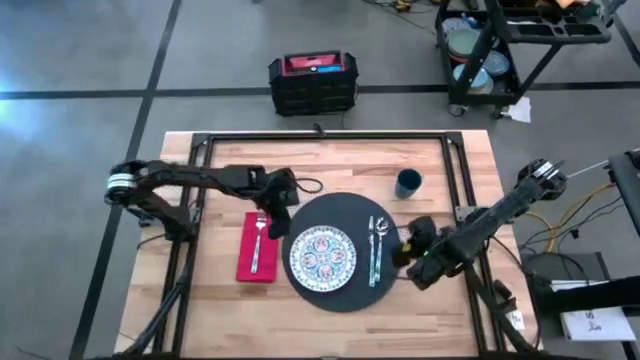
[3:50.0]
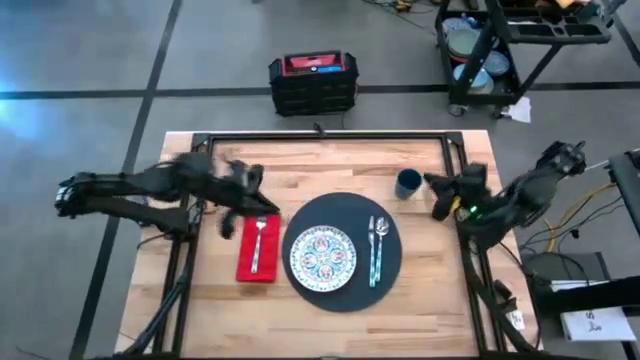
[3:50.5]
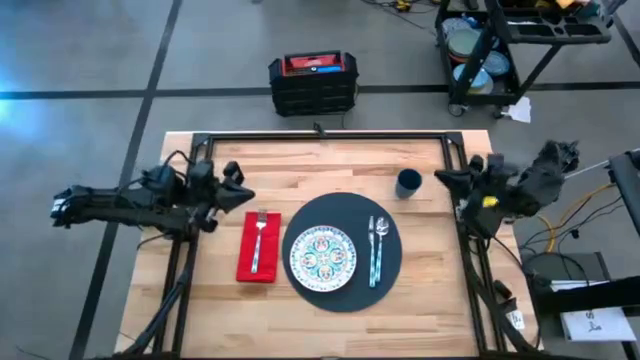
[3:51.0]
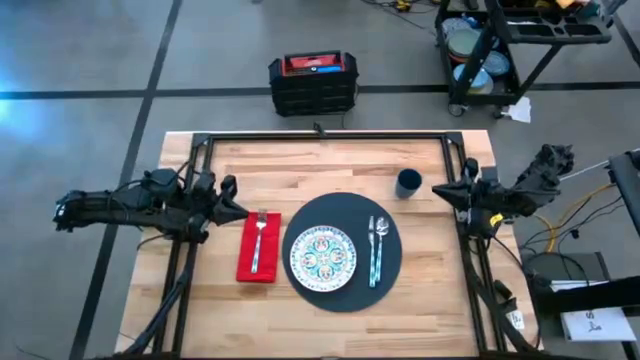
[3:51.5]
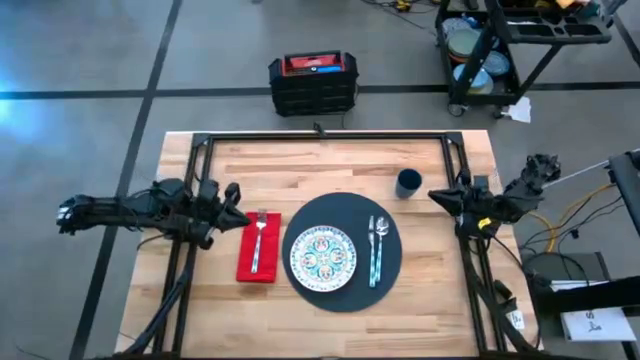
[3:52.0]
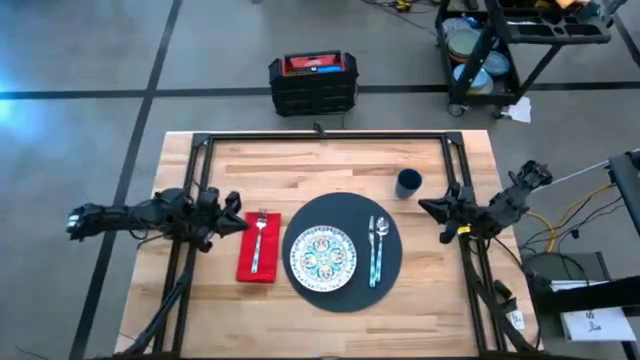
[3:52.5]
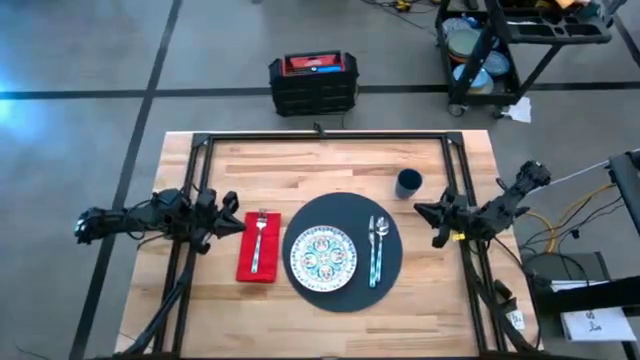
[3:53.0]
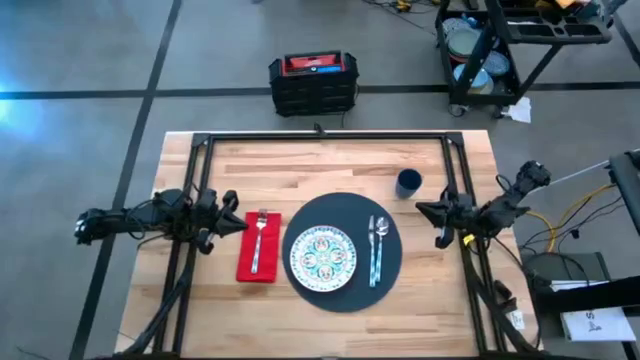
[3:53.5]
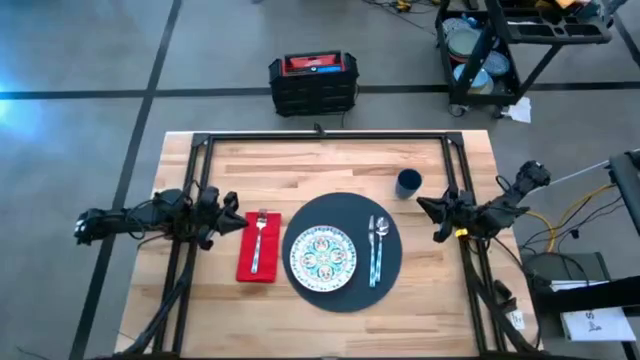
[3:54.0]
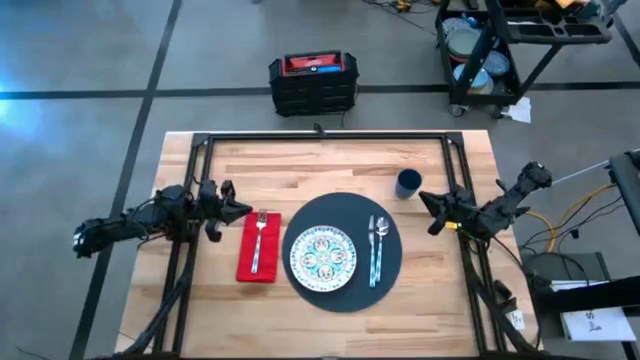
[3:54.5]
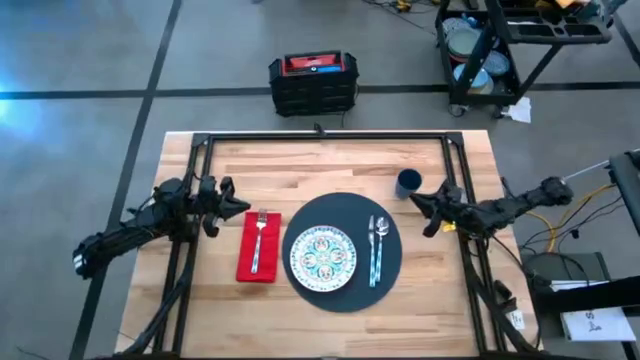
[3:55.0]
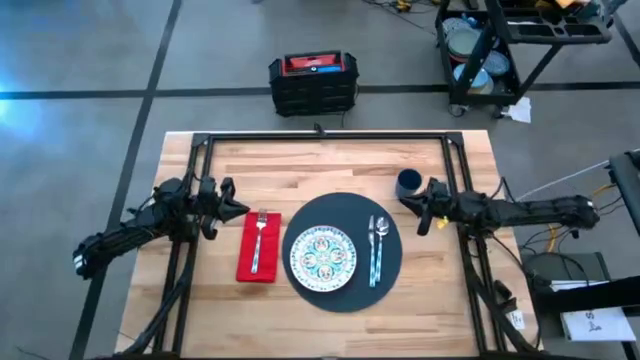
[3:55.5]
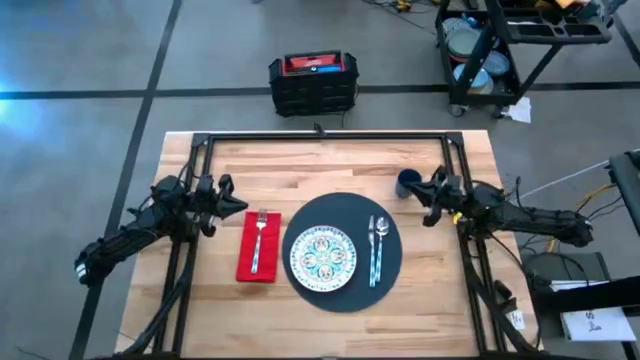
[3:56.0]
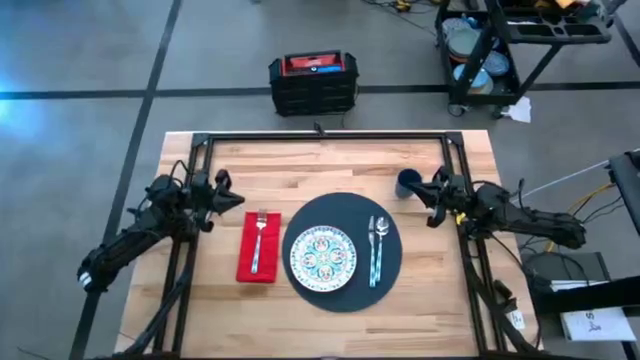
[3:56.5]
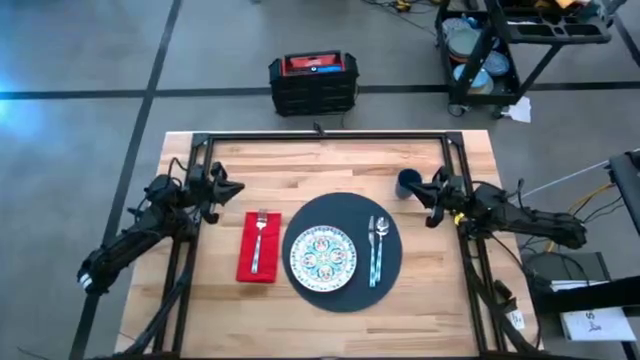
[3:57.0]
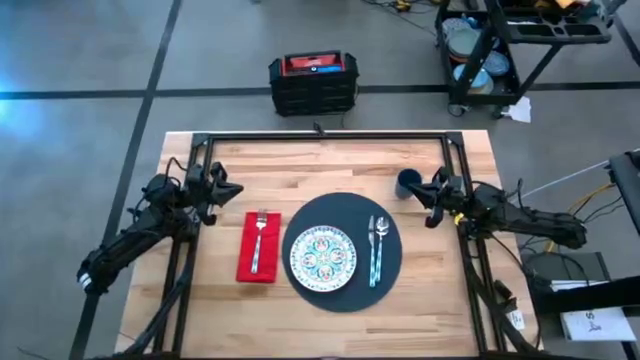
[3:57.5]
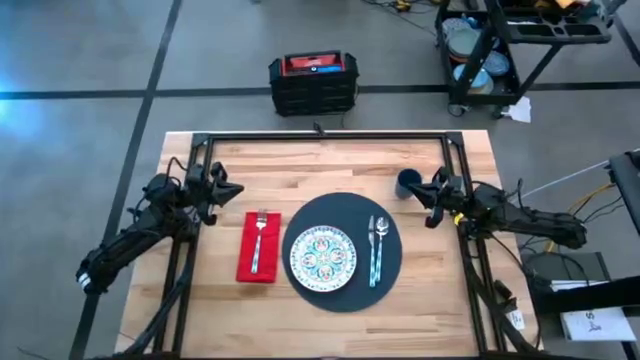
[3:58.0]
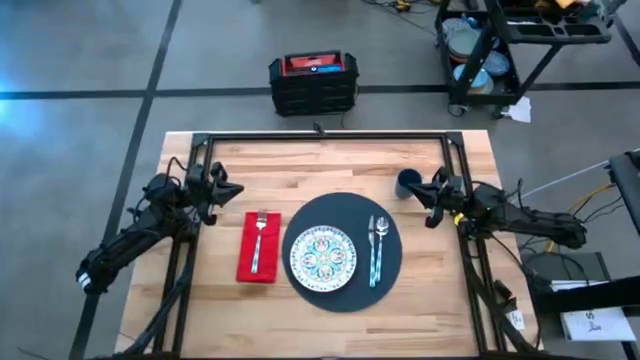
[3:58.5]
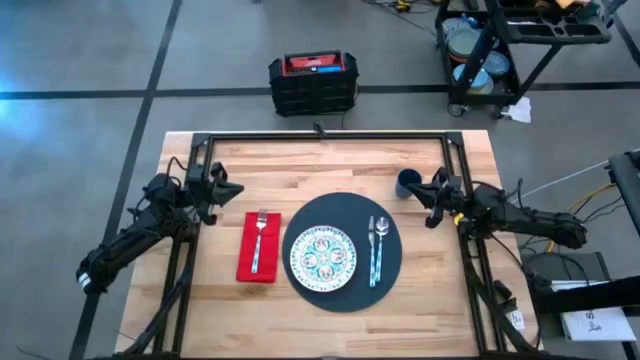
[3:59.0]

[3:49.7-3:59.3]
Task: Set table place
Return to Home Position

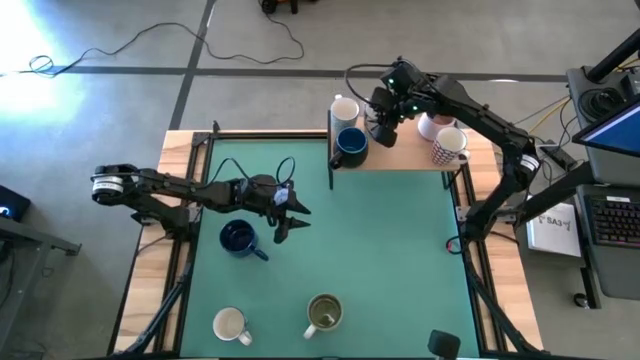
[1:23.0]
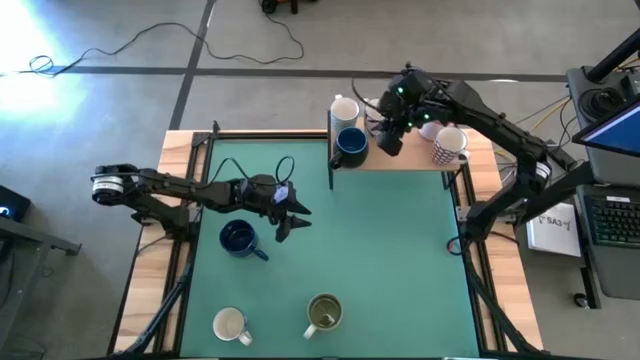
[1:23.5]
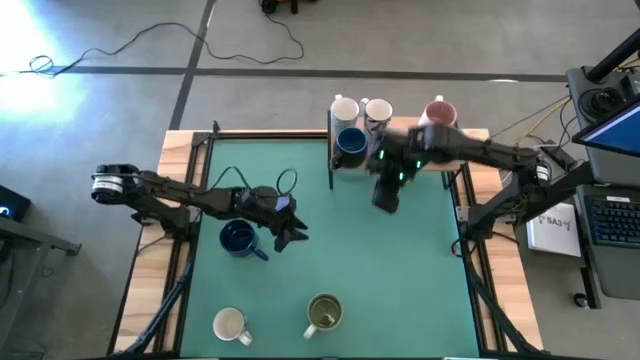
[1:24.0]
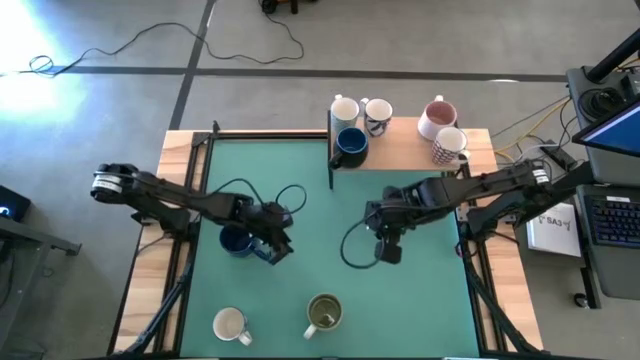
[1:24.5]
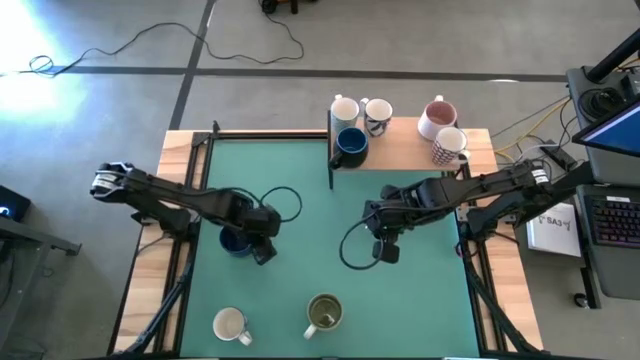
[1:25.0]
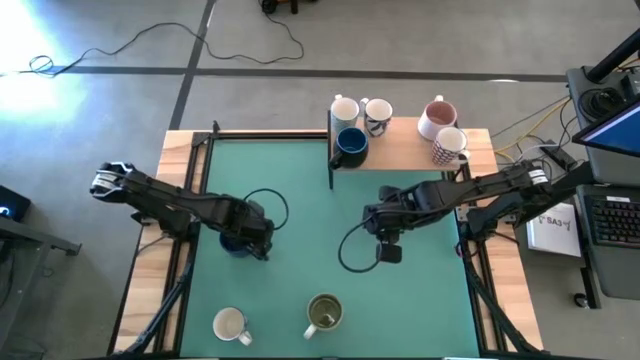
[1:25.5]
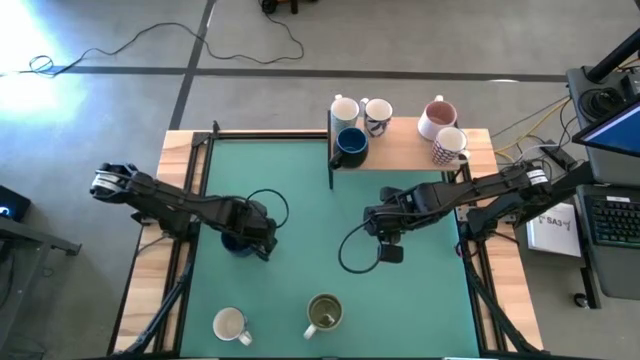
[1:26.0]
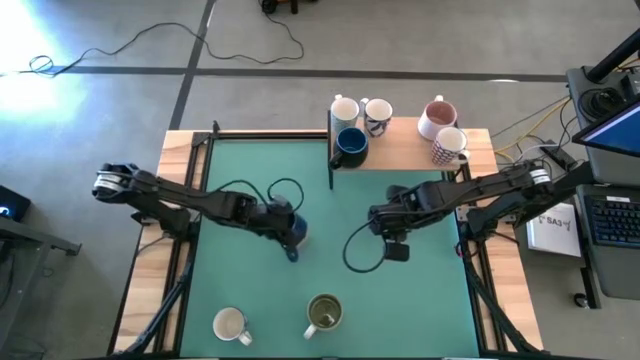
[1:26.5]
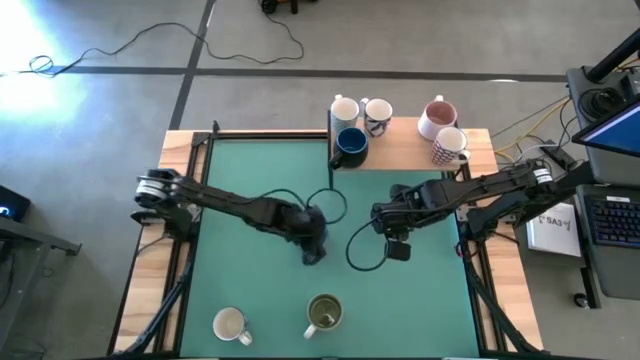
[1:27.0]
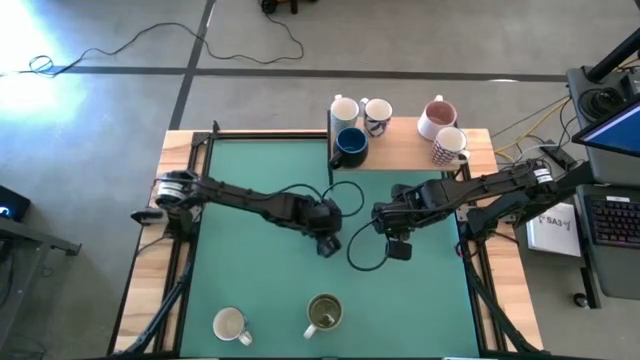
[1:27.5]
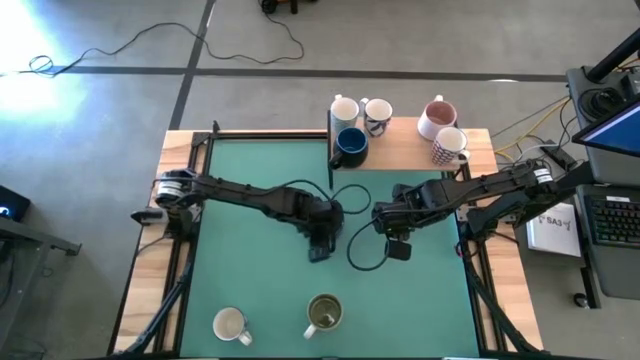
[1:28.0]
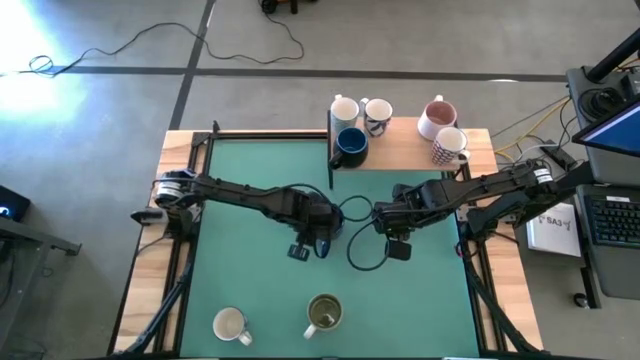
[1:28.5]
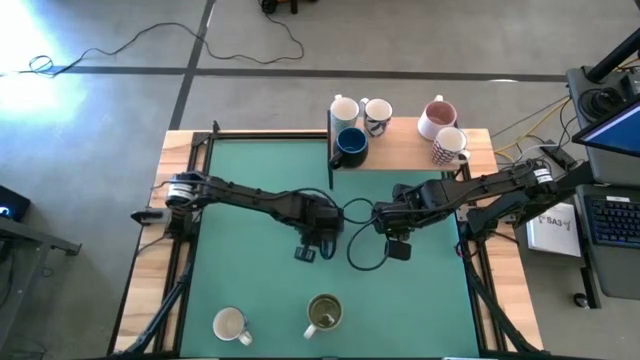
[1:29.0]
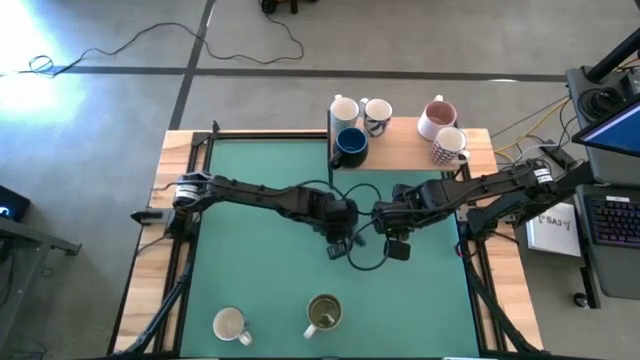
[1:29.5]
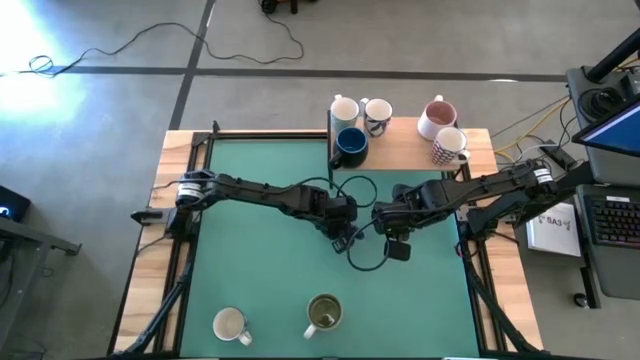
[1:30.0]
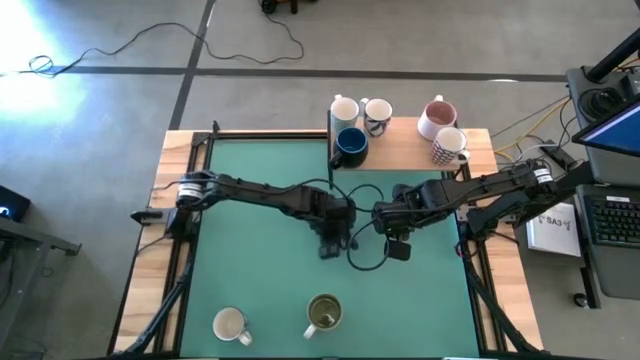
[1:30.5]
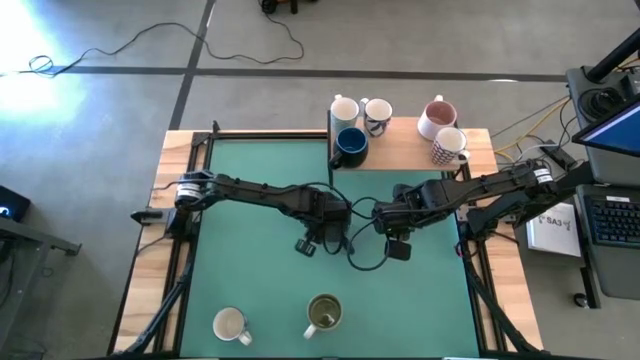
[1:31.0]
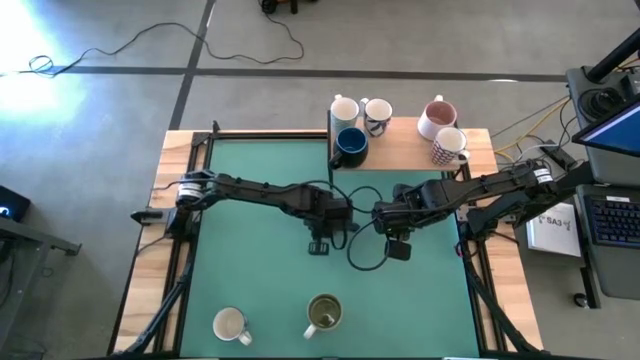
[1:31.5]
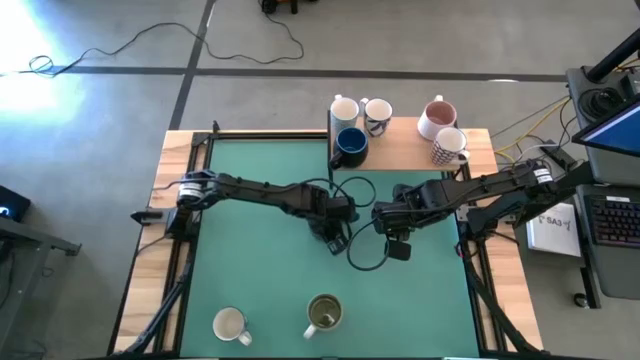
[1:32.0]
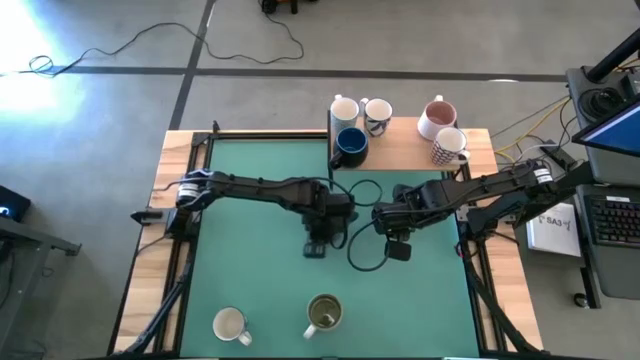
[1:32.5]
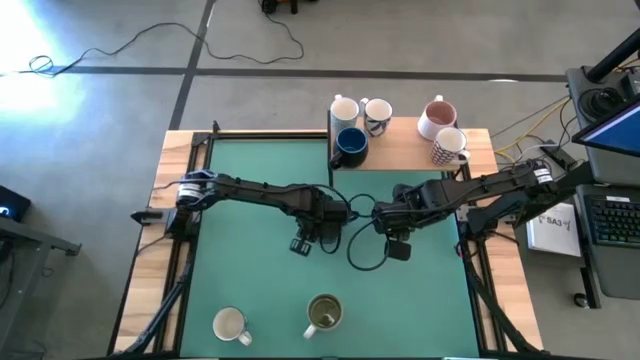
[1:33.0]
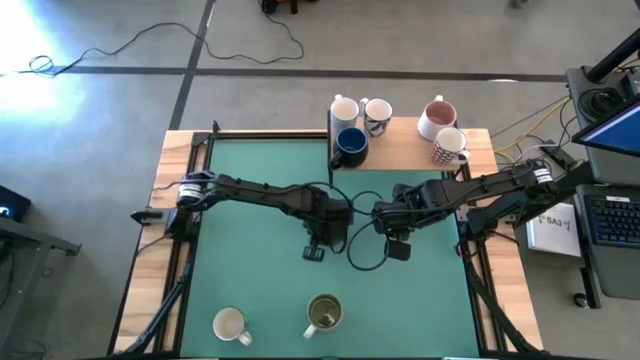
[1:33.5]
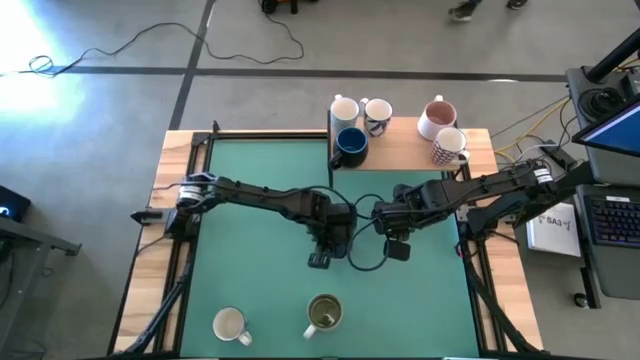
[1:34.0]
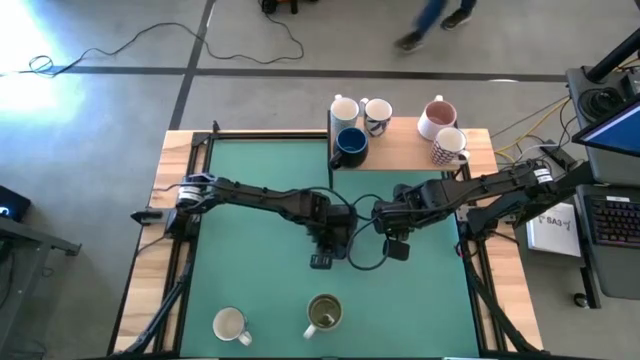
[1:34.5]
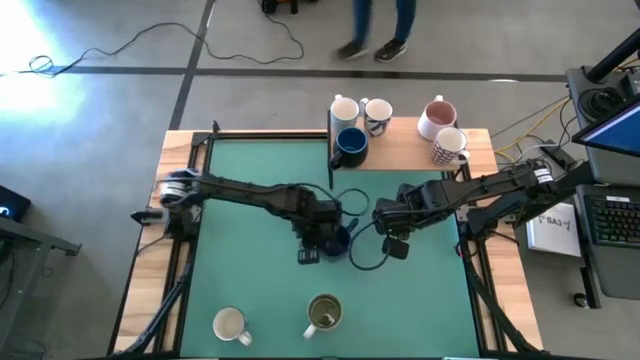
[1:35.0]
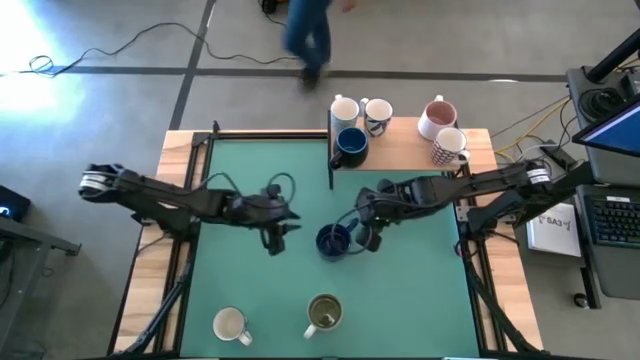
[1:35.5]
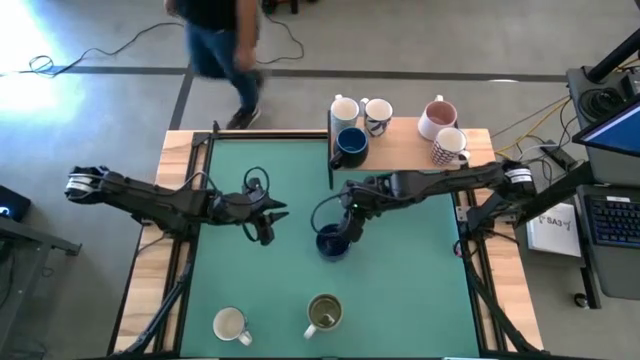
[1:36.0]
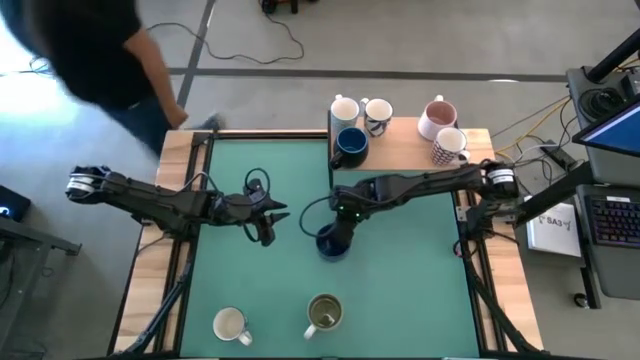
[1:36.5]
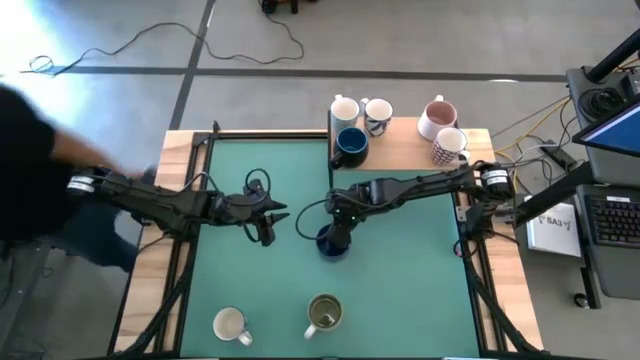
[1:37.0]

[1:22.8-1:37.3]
Task: Place coffee mugs
Put the blue mug on the shelf
